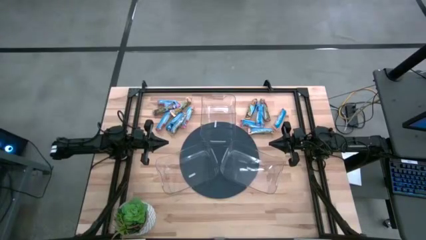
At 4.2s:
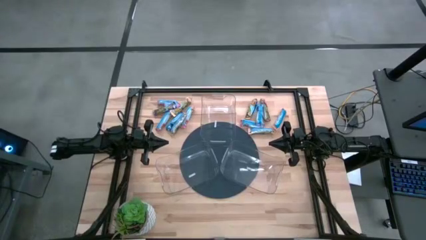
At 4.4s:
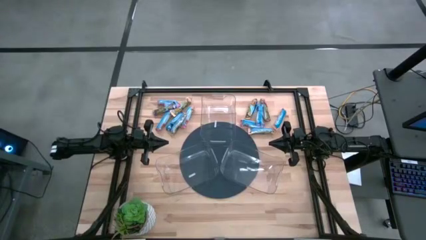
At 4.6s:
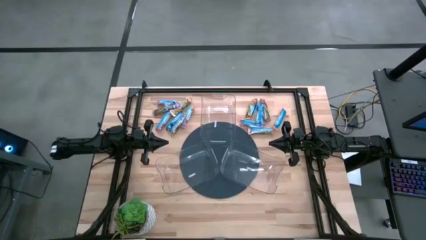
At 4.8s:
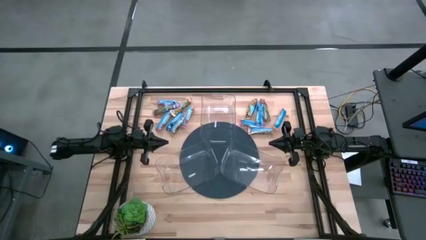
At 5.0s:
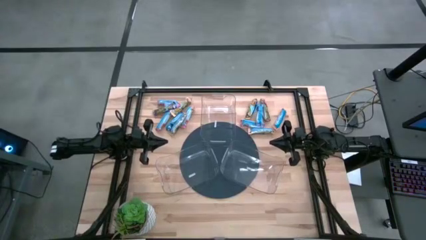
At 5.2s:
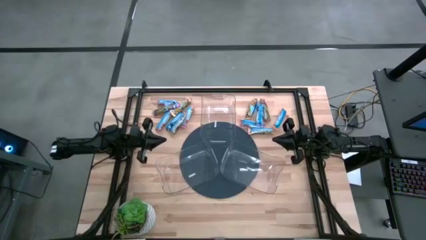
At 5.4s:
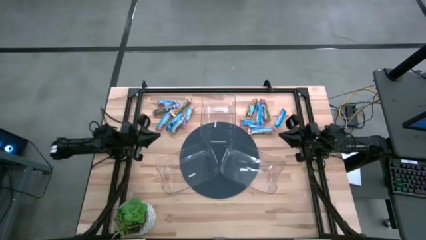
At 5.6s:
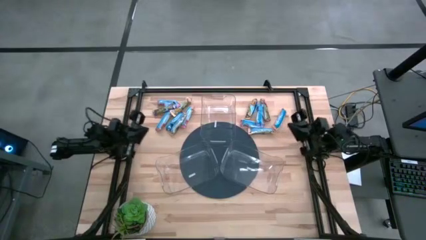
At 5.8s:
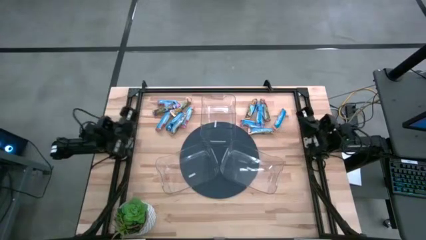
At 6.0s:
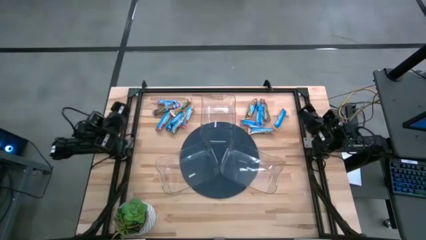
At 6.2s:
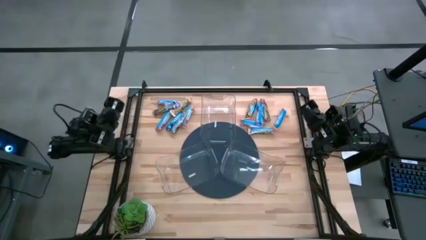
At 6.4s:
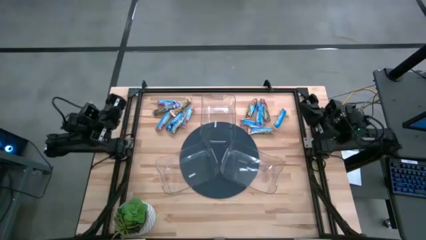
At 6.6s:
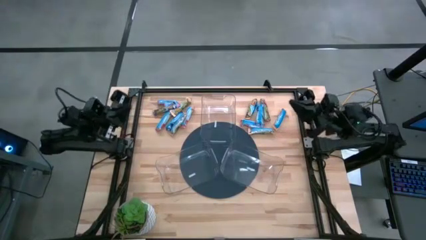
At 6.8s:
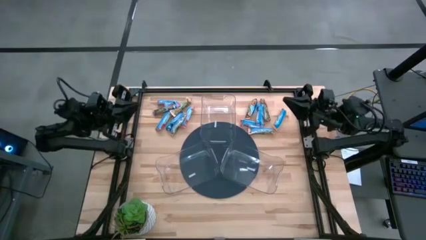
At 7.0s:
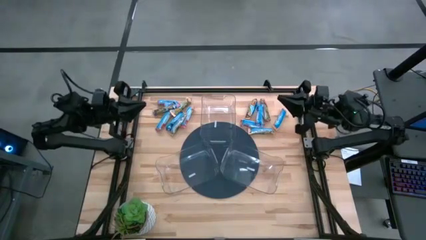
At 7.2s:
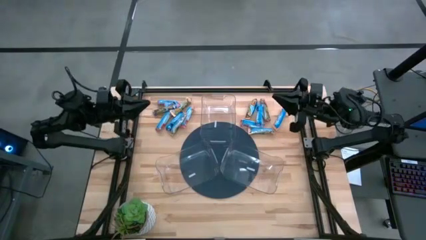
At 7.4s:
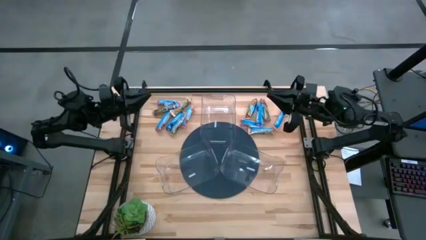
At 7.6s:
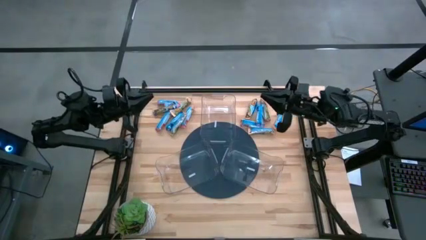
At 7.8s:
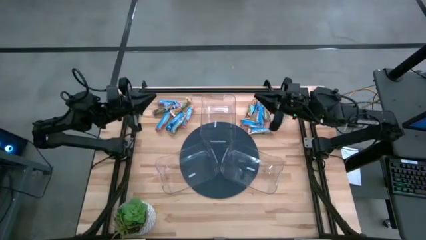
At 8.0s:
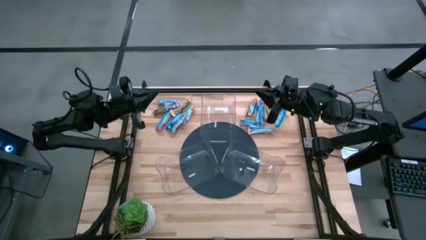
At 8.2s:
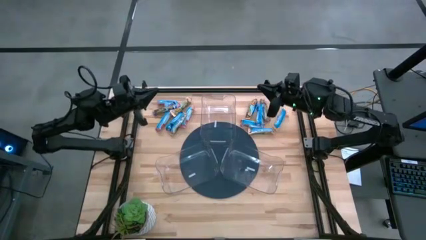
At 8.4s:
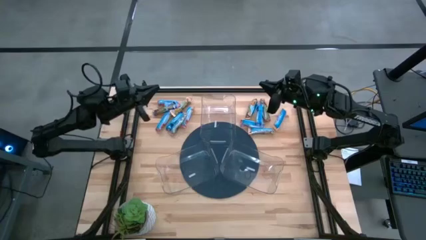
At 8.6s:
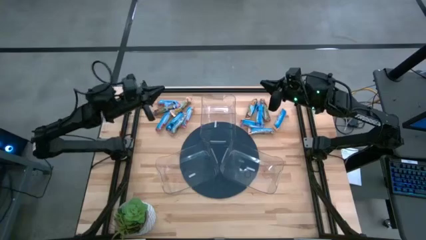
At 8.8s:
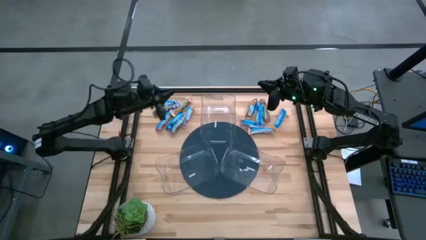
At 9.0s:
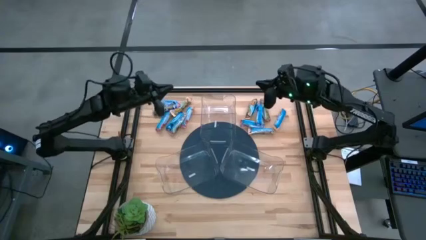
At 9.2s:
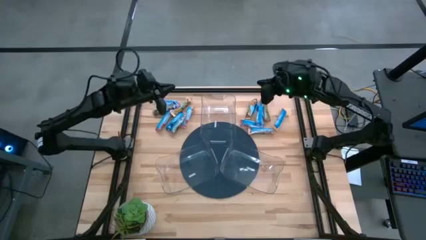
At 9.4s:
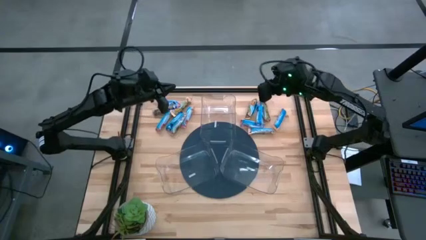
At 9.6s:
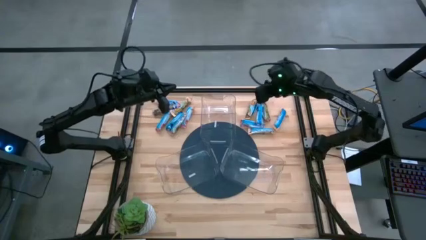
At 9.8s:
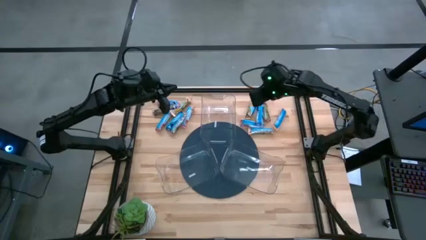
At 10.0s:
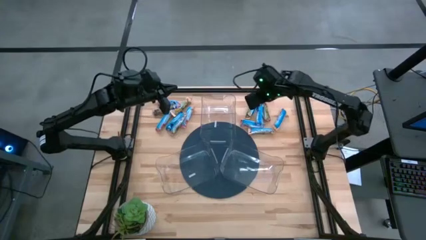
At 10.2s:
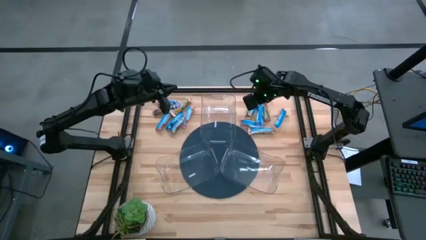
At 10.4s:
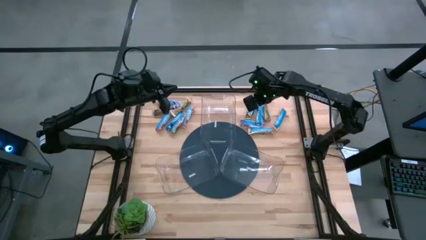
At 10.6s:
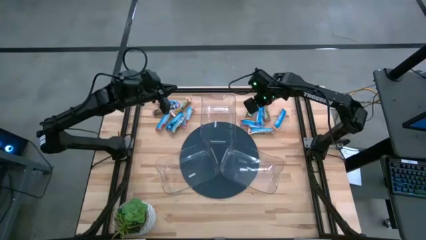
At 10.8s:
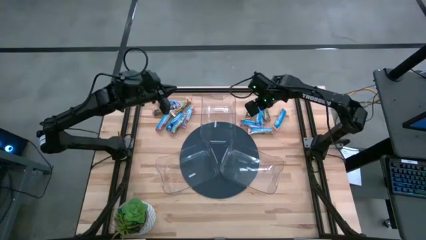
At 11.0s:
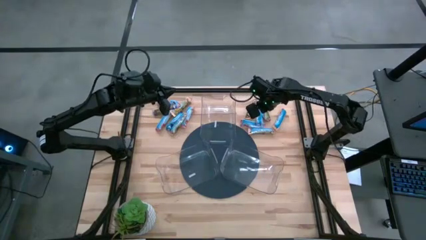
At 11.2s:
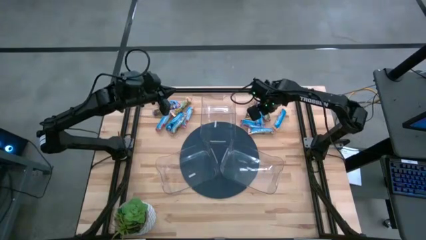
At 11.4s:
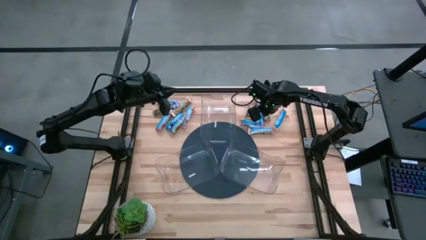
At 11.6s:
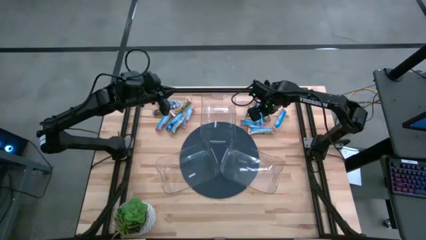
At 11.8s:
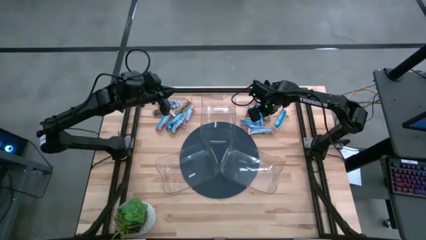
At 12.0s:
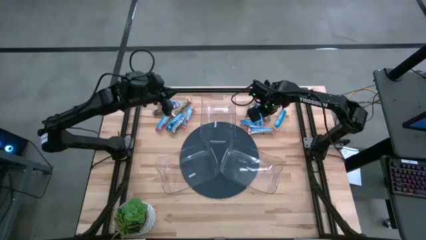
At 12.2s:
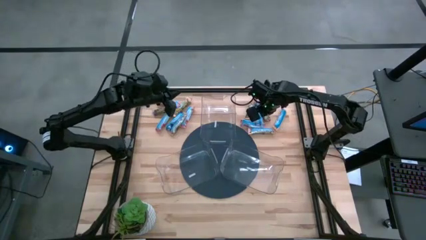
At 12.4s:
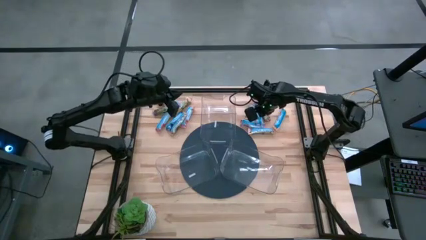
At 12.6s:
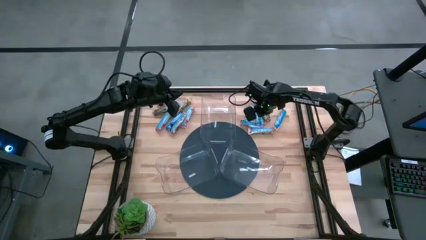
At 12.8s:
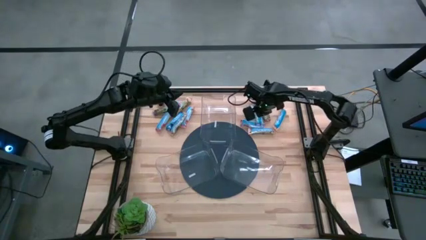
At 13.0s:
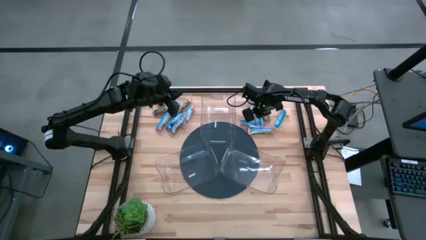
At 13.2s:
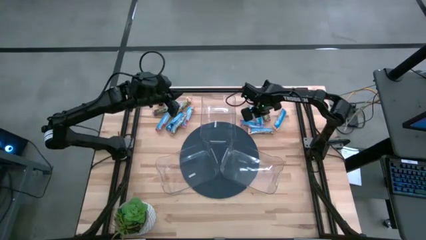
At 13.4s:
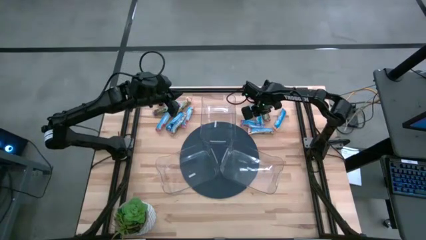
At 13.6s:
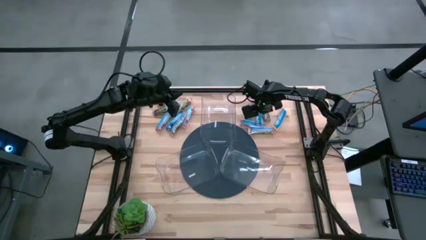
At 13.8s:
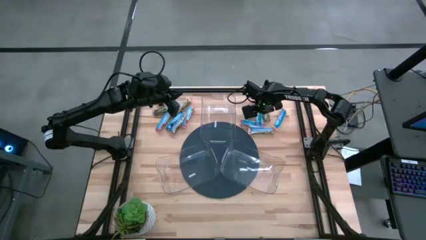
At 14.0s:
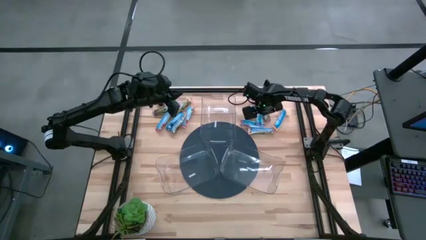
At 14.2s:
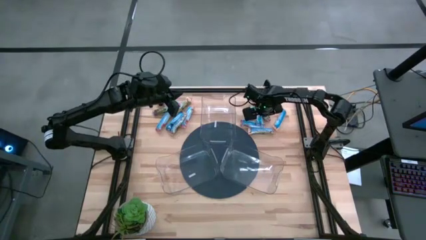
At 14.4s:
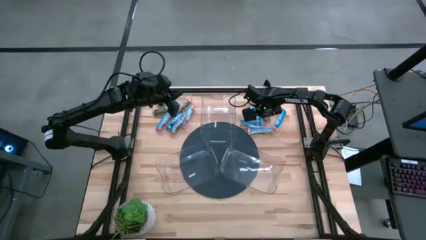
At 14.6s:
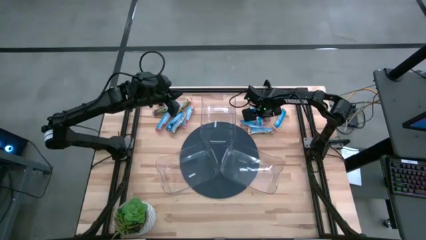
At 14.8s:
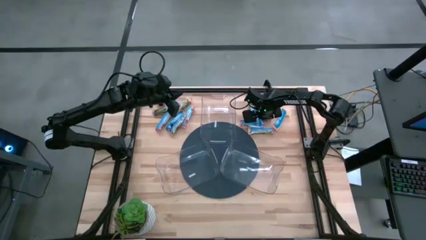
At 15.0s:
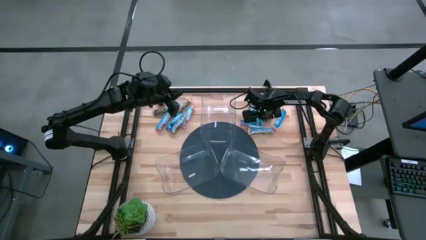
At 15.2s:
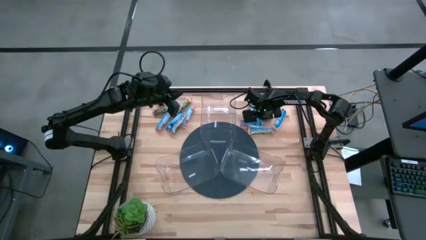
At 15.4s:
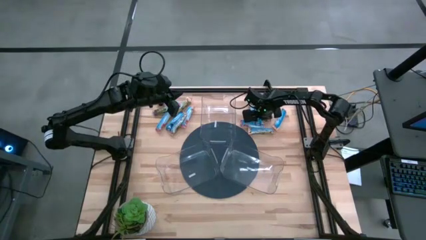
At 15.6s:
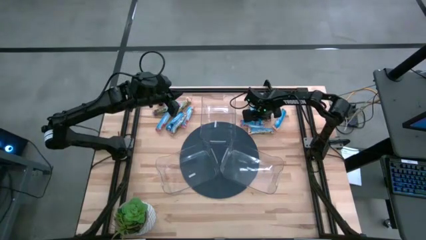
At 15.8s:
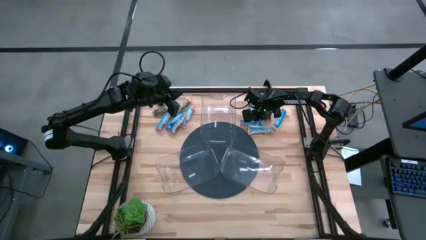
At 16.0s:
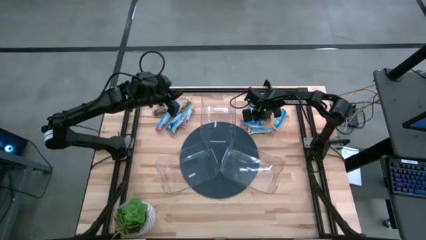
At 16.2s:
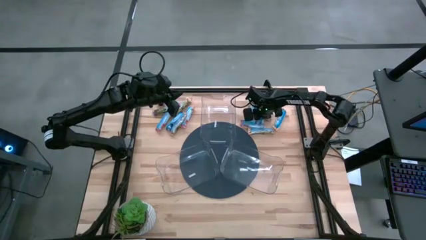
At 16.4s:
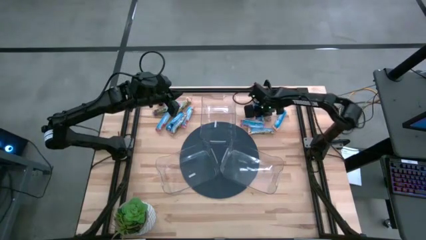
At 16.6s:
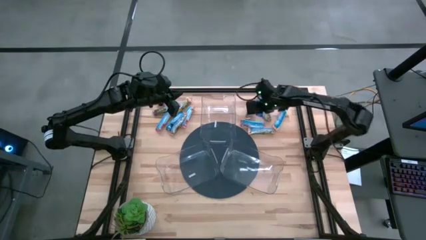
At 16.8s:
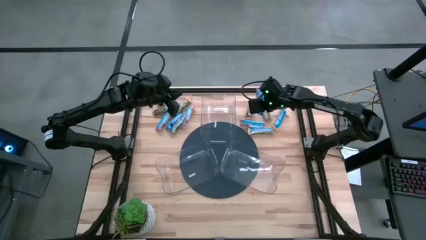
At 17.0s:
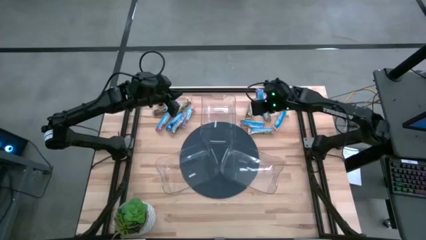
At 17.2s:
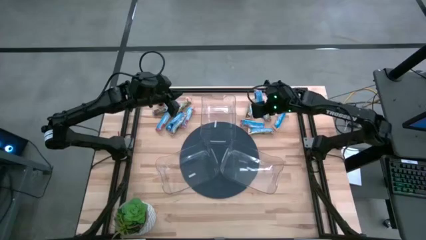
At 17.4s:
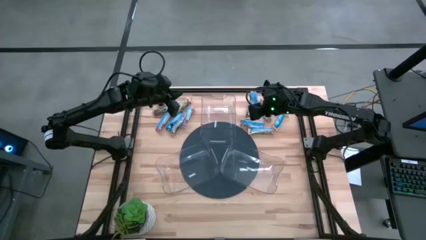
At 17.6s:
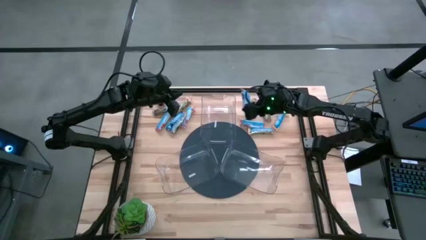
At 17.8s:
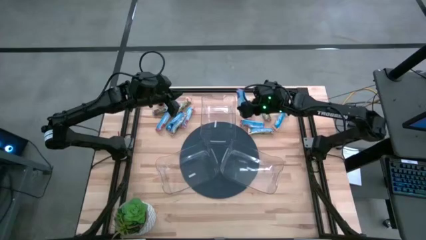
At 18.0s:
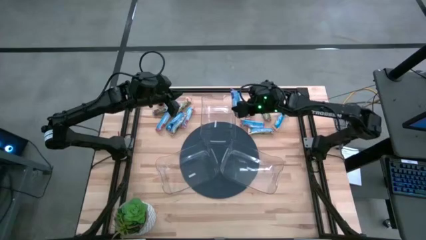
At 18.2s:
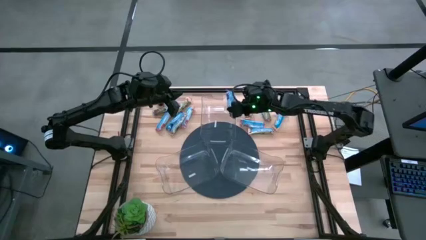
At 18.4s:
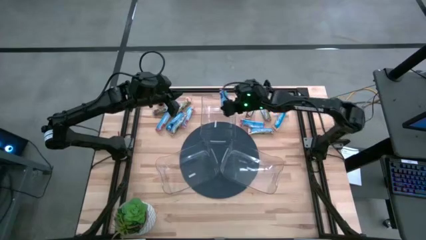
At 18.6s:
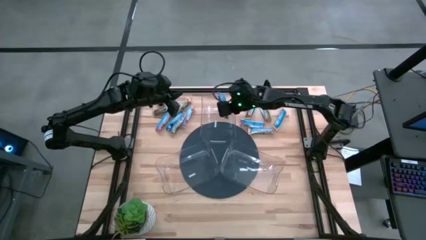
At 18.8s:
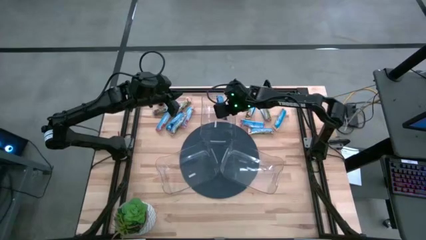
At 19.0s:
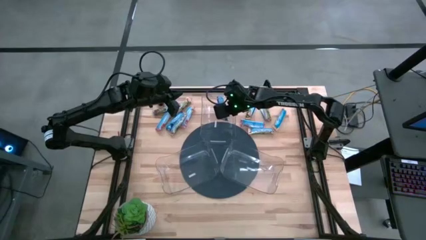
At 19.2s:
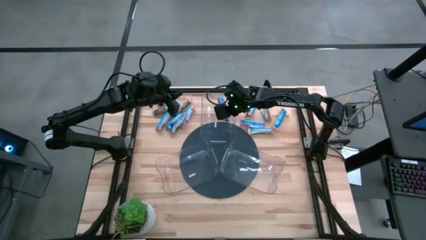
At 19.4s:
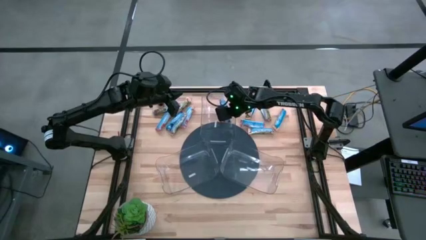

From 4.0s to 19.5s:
Task: Pick and place Granola Bars by type
Put the right blue granola bar into the top transparent bin
